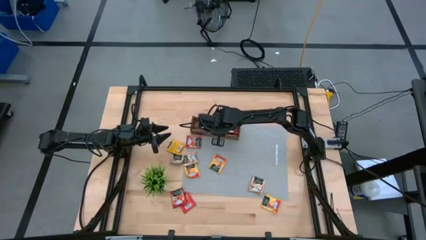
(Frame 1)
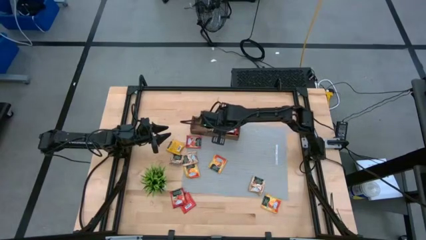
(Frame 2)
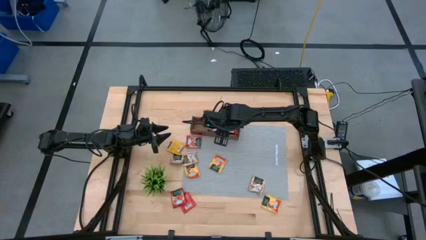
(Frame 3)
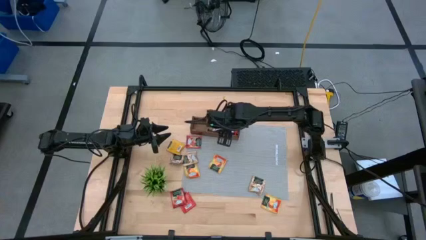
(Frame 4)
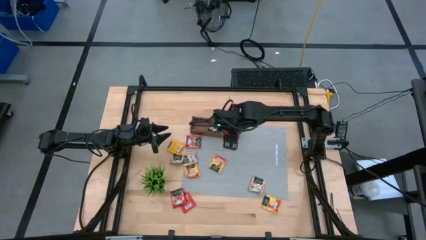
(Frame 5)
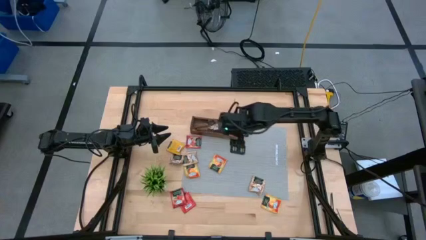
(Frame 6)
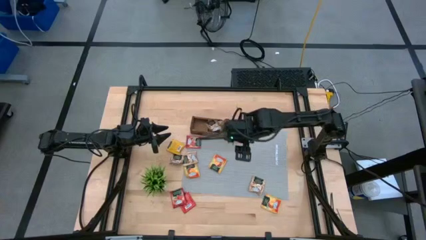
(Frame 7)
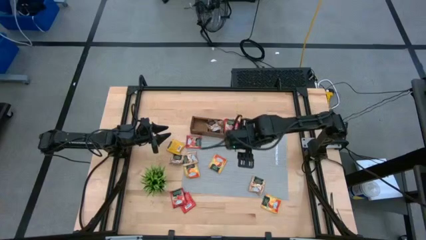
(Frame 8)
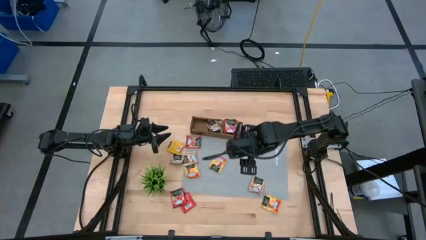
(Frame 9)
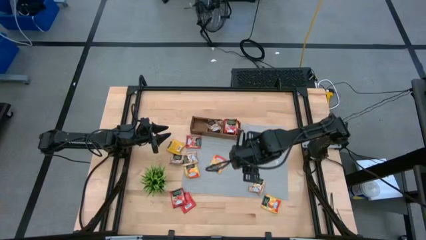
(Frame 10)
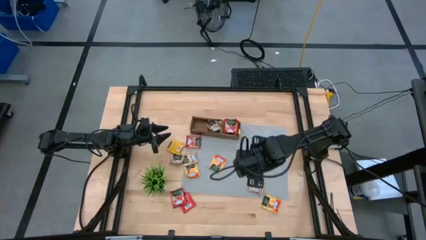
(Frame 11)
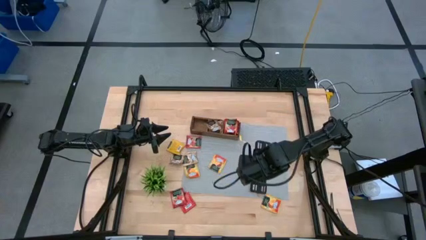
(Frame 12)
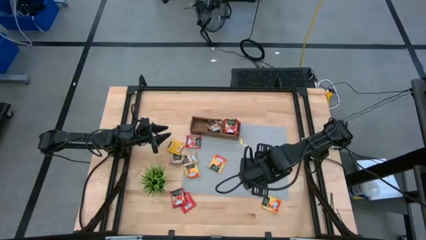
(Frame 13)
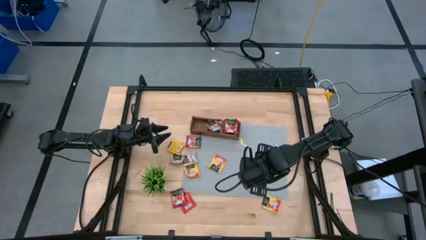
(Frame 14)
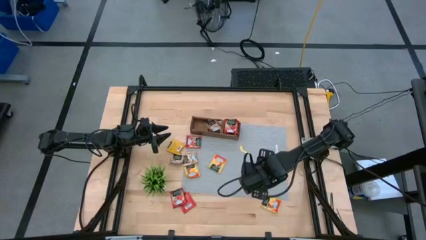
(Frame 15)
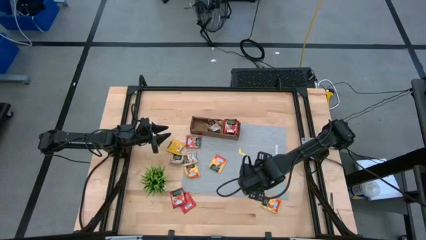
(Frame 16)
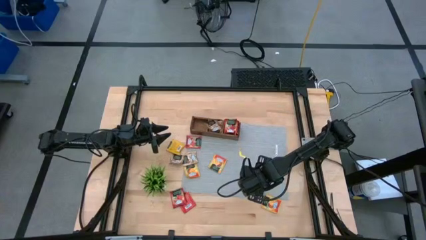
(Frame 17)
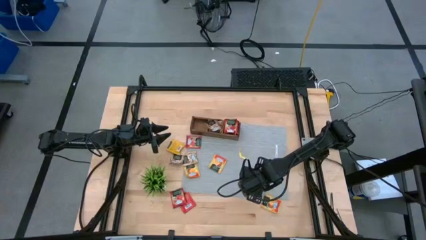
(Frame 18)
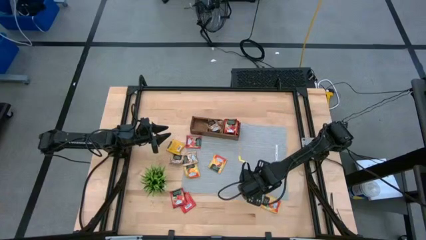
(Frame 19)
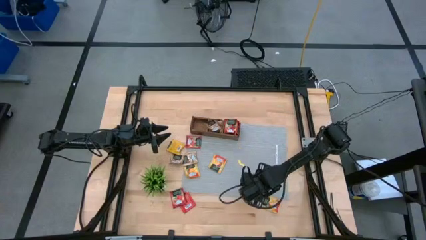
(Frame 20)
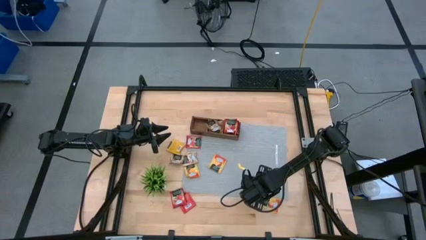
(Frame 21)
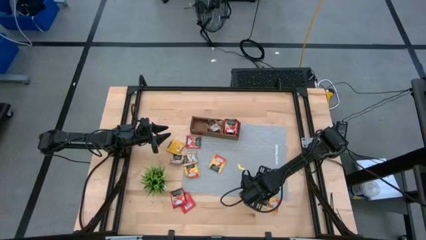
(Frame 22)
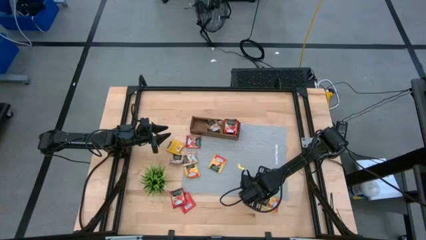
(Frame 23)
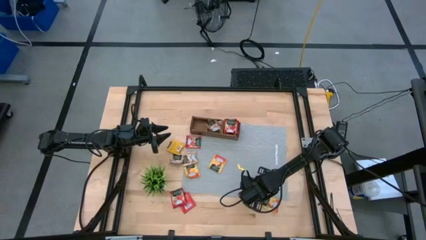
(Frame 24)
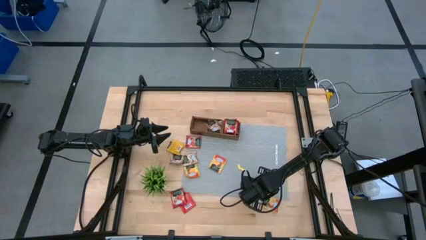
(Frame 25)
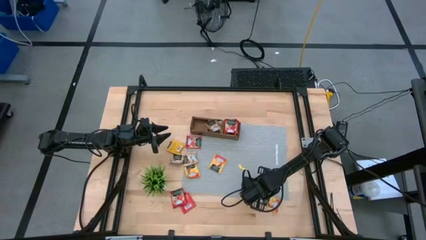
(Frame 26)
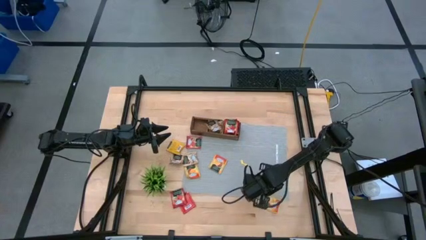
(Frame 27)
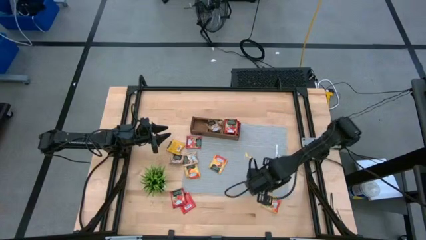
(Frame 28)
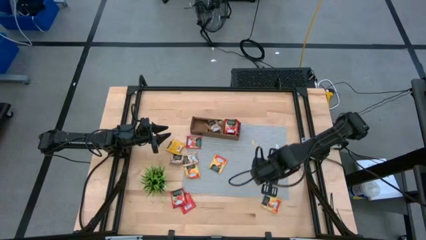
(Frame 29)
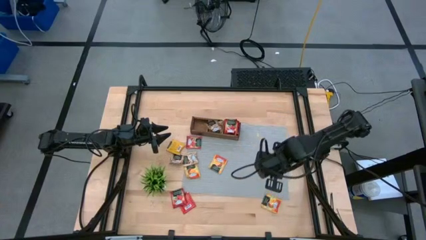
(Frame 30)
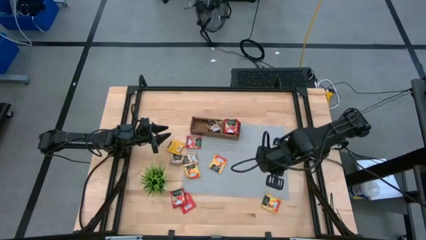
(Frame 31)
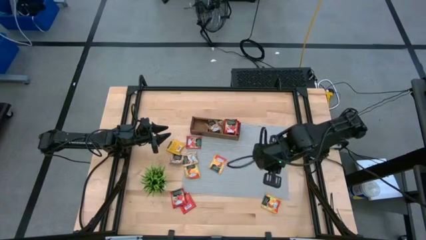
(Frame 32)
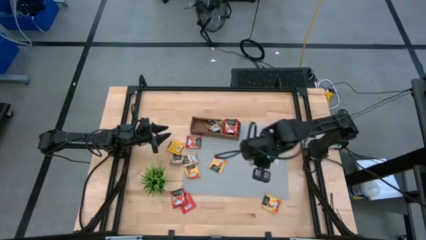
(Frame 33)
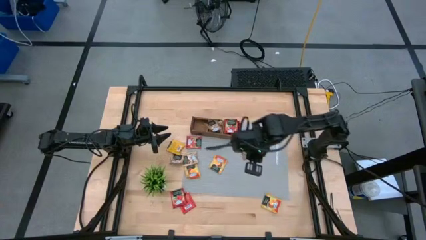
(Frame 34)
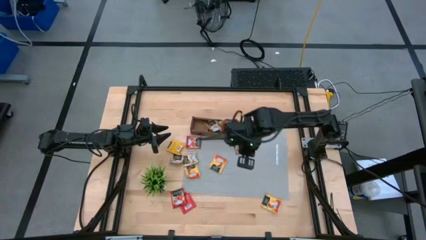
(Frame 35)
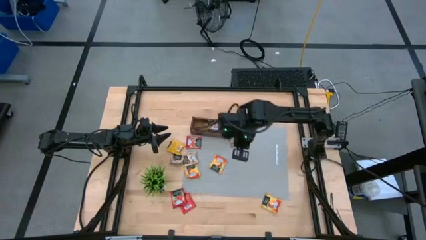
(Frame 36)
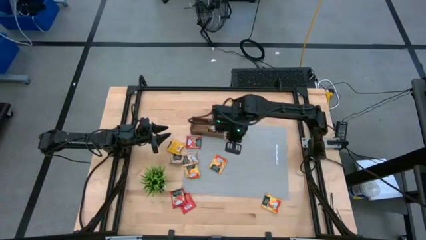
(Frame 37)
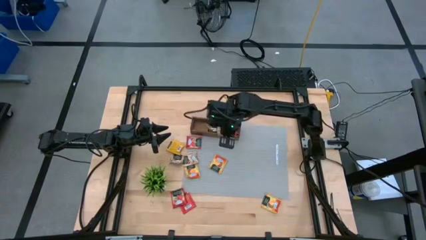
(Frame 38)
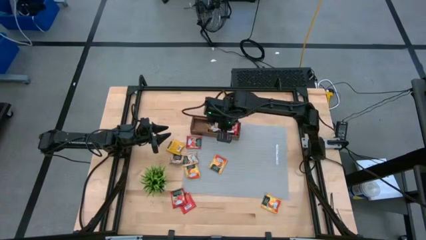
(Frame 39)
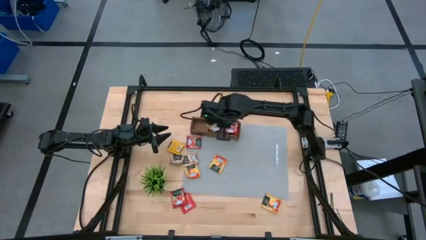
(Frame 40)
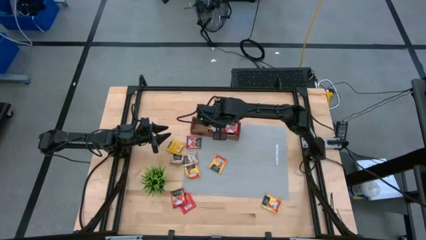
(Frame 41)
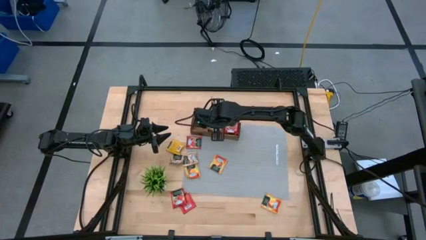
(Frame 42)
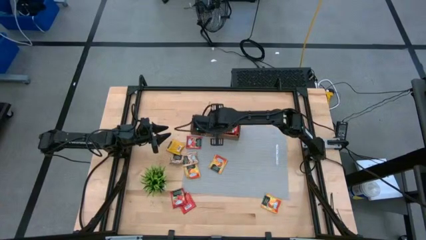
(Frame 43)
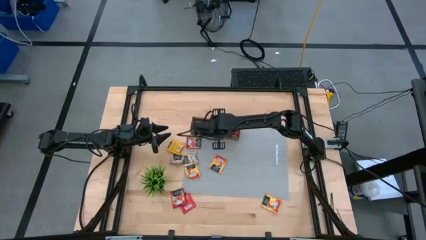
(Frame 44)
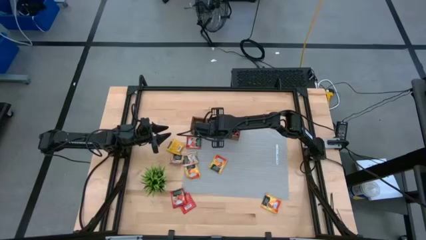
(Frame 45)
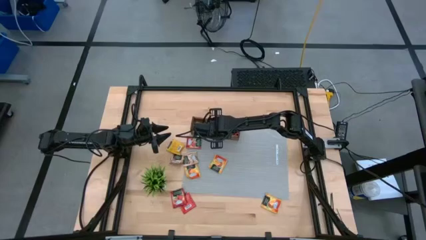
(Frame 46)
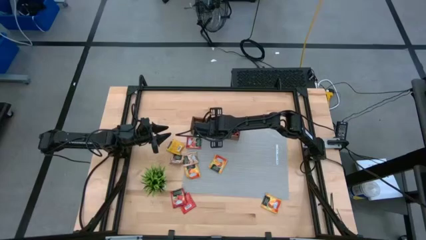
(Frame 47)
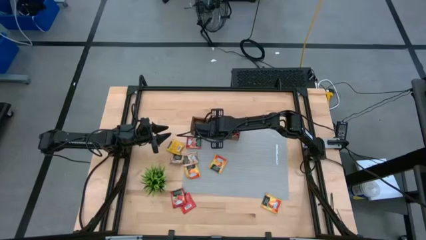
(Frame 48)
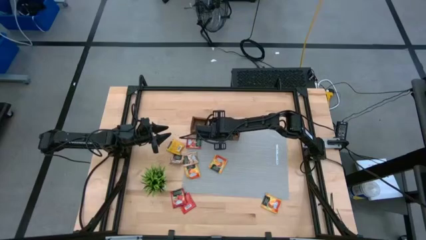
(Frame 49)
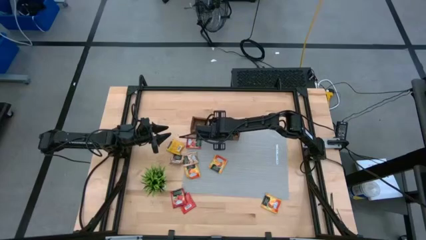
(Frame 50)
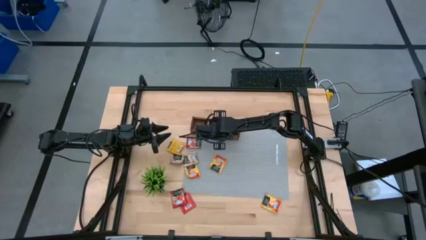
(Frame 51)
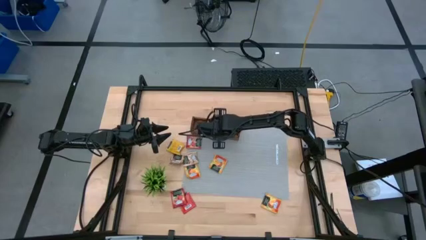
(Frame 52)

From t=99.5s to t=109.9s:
Task: Pick & Place Tea
Put the gold tea bag into the middle section of the wooden organizer
